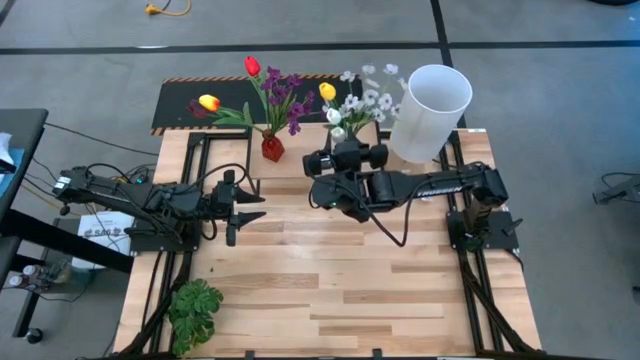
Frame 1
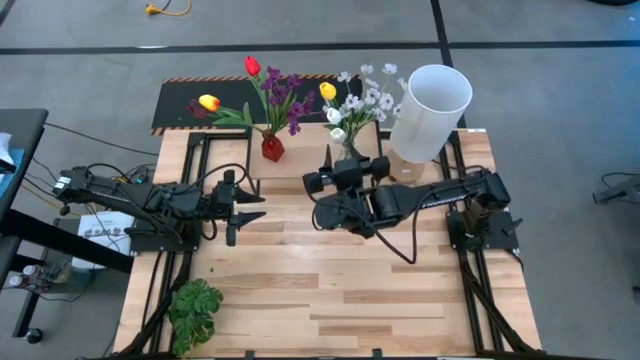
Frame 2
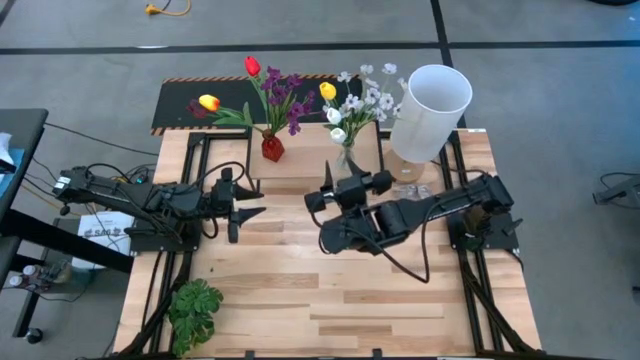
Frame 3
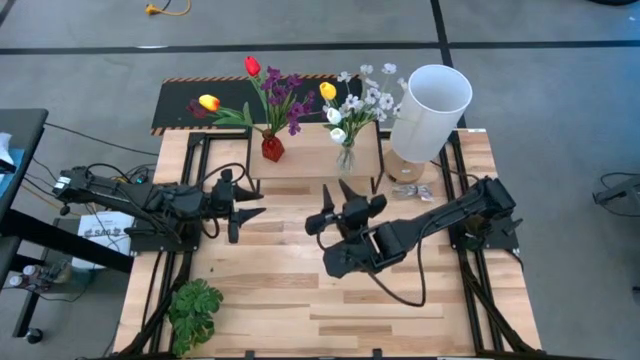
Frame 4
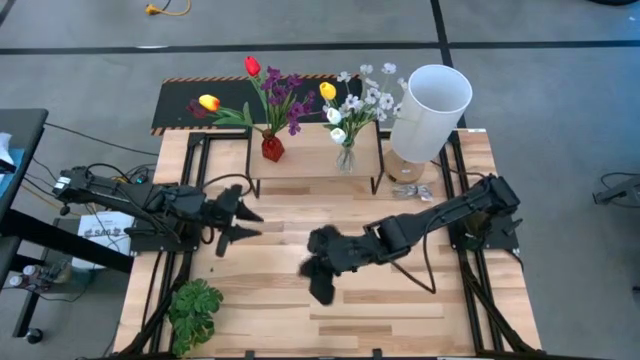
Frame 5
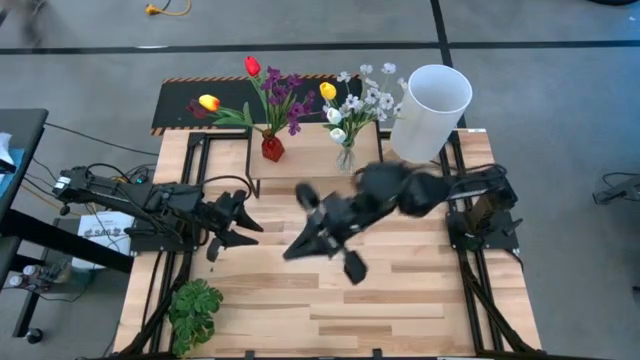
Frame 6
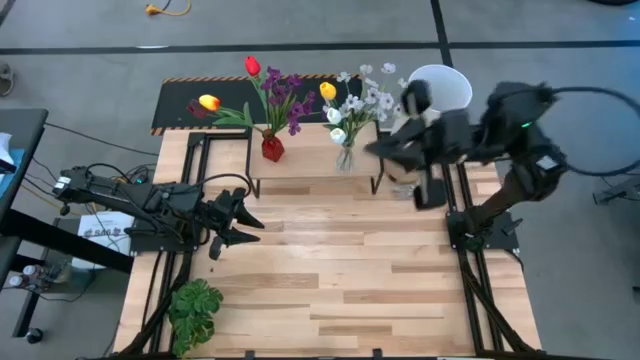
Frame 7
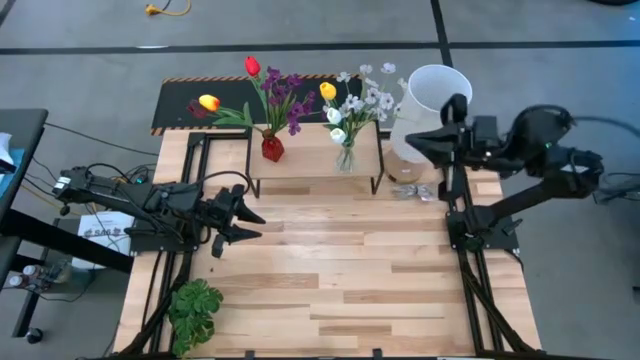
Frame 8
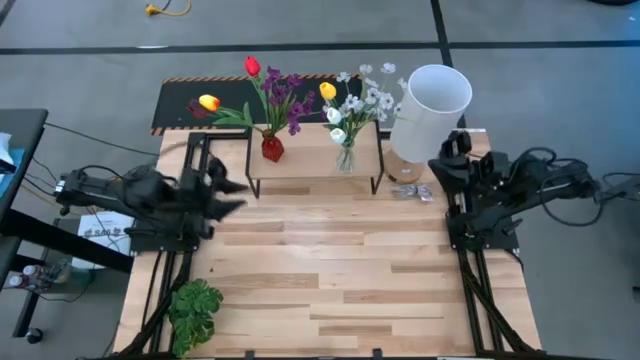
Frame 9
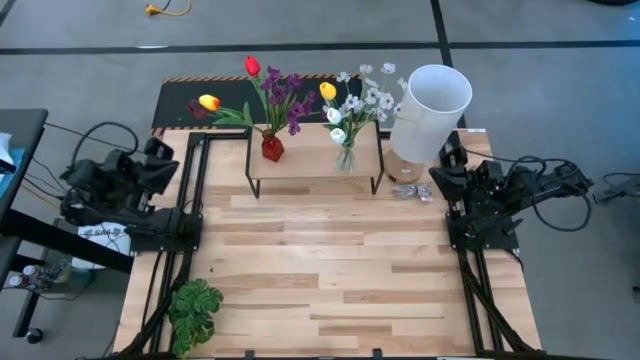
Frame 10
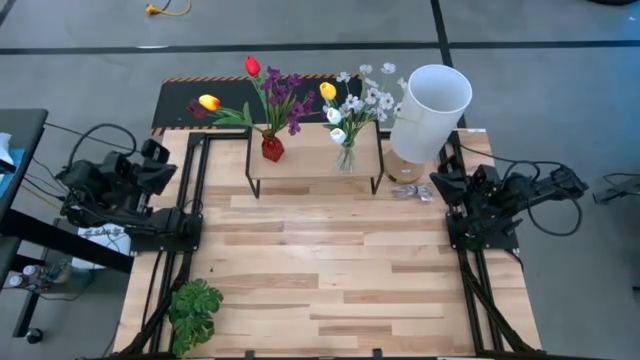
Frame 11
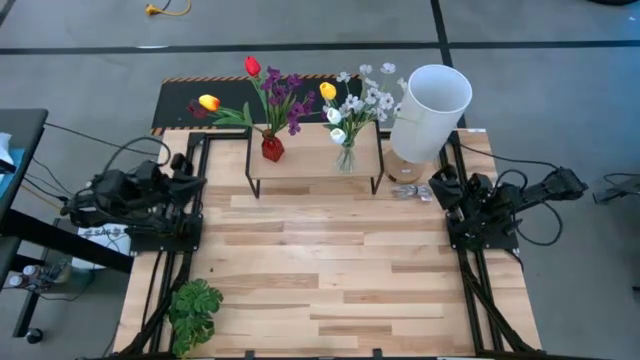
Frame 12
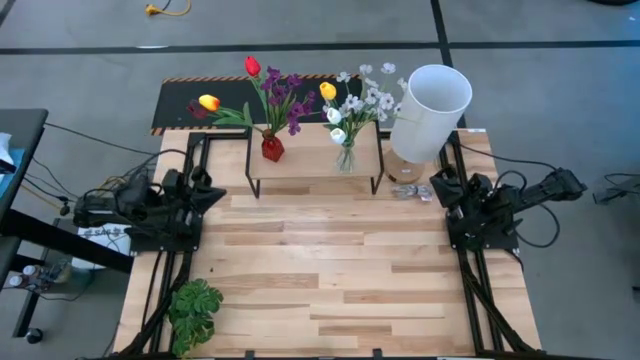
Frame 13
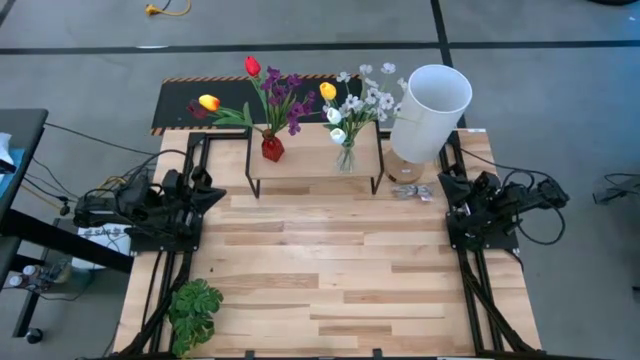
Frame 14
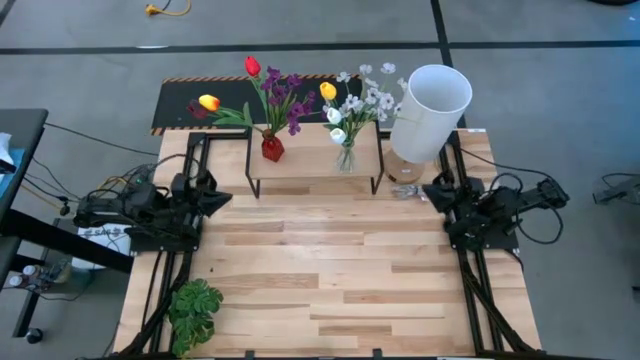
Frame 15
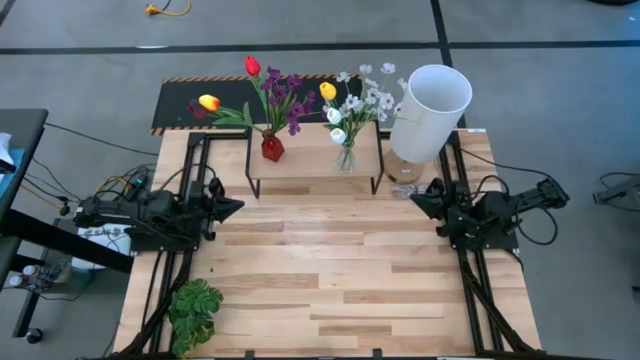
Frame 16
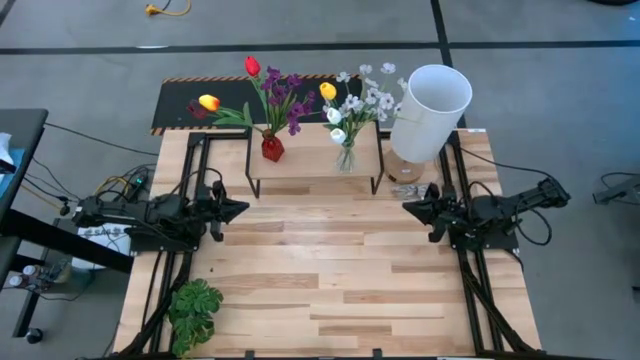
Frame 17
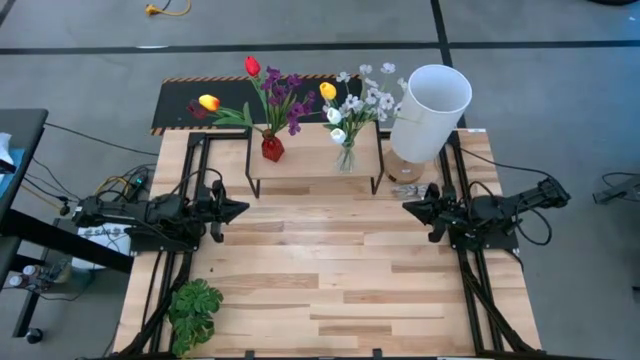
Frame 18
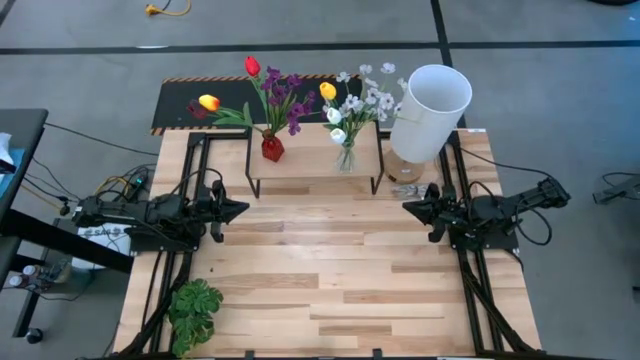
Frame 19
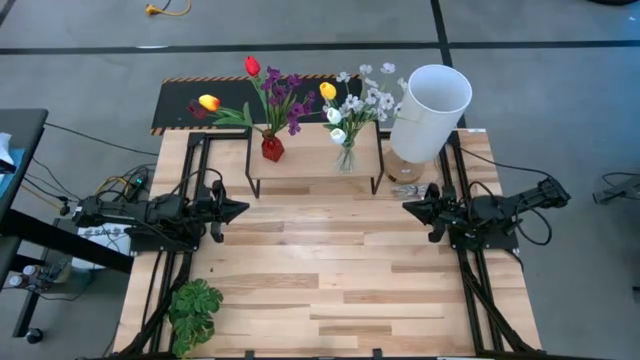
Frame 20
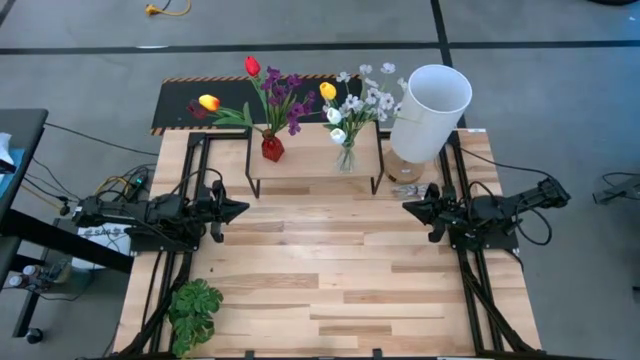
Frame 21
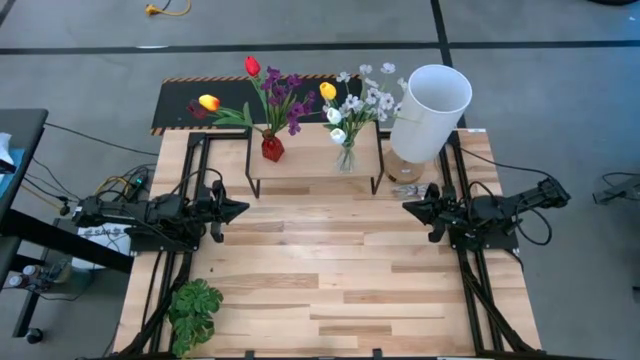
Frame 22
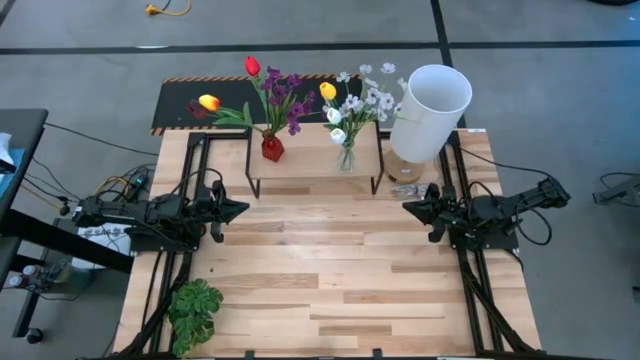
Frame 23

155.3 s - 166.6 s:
Task: Pick and place flowers into a vace then onto a shelf
Return to Home Position

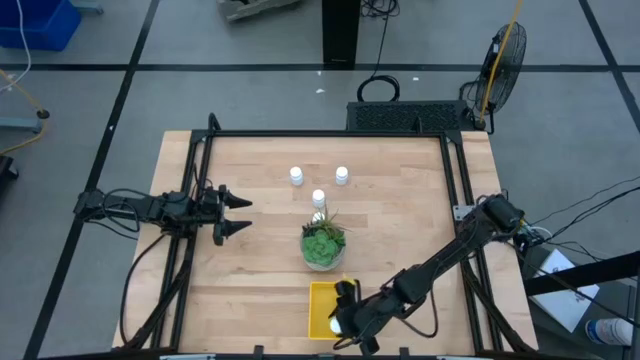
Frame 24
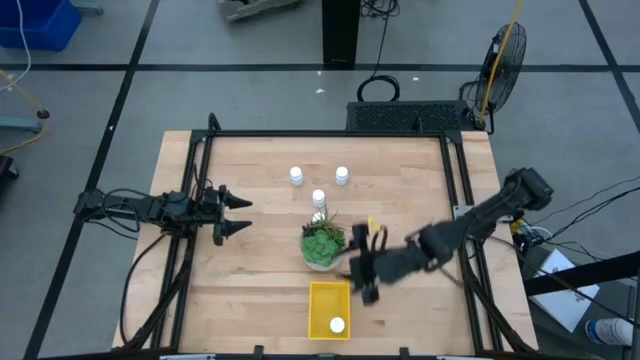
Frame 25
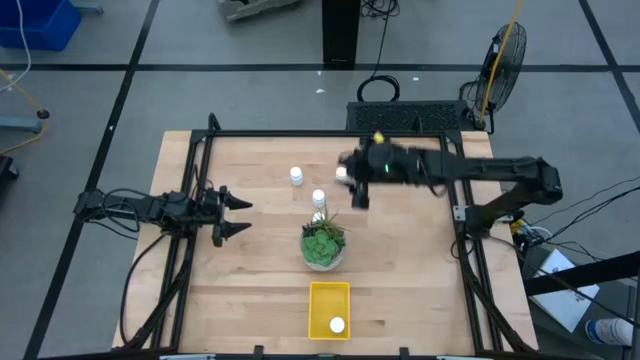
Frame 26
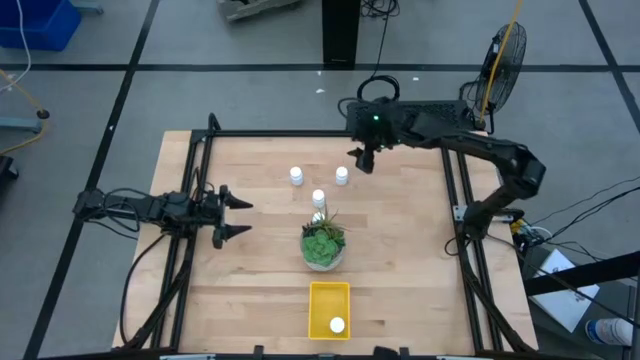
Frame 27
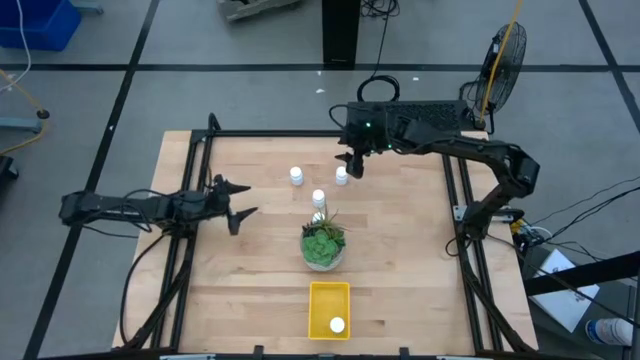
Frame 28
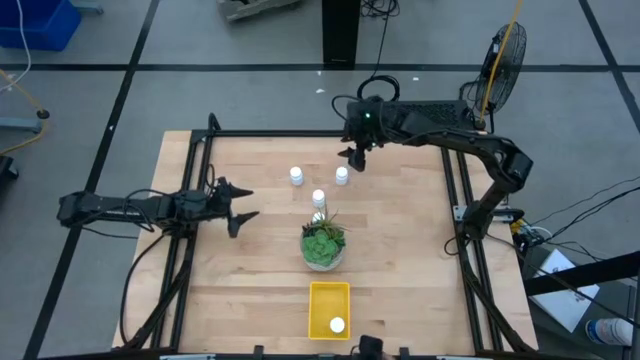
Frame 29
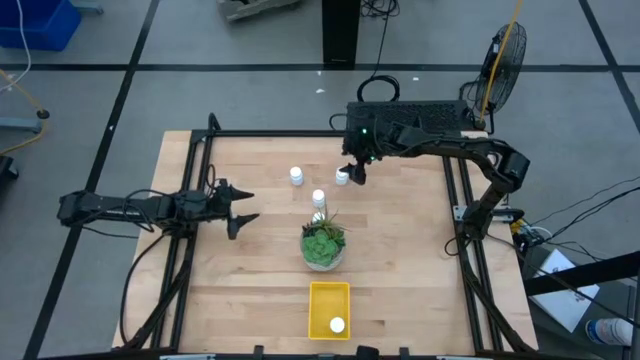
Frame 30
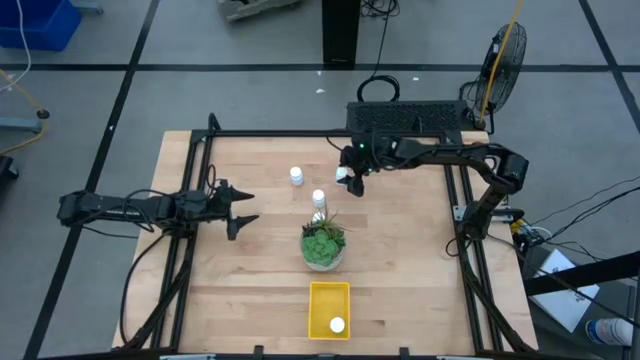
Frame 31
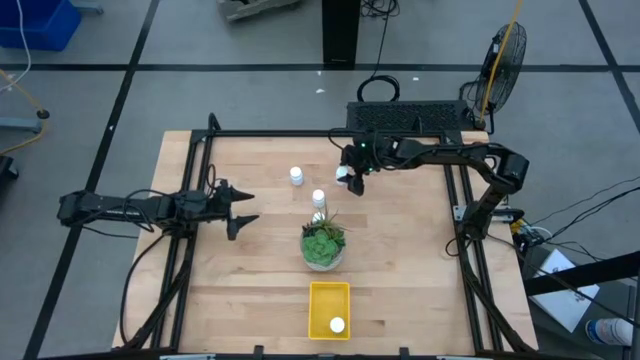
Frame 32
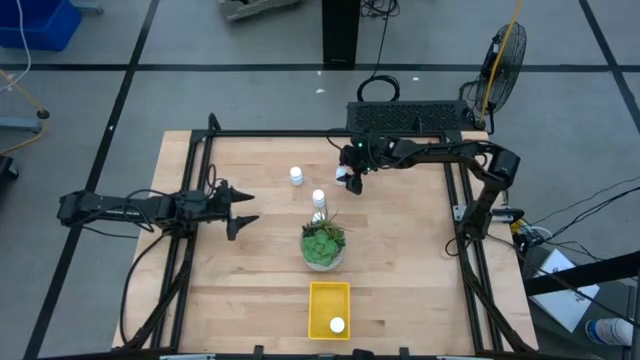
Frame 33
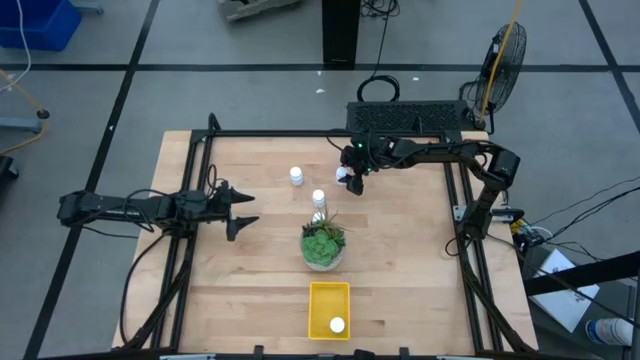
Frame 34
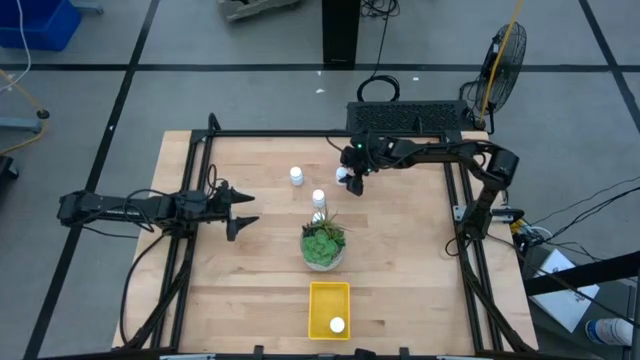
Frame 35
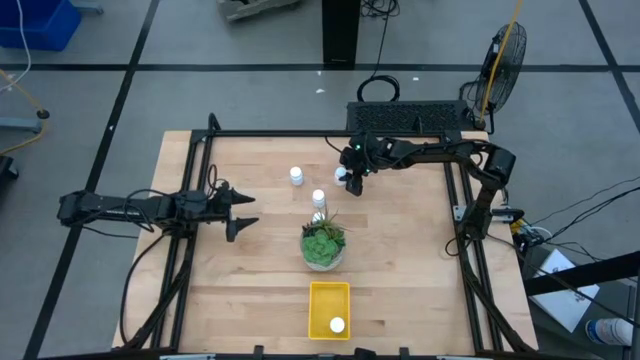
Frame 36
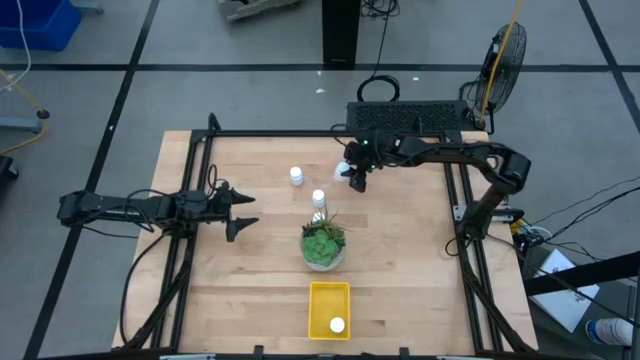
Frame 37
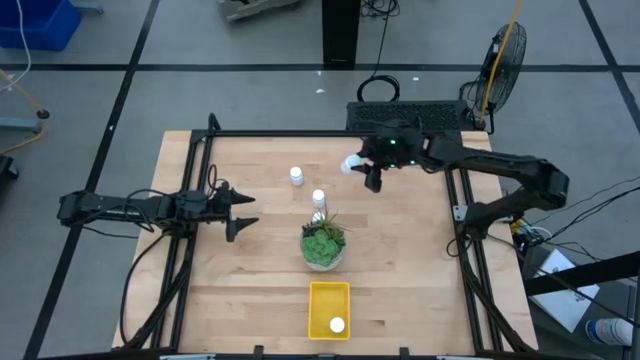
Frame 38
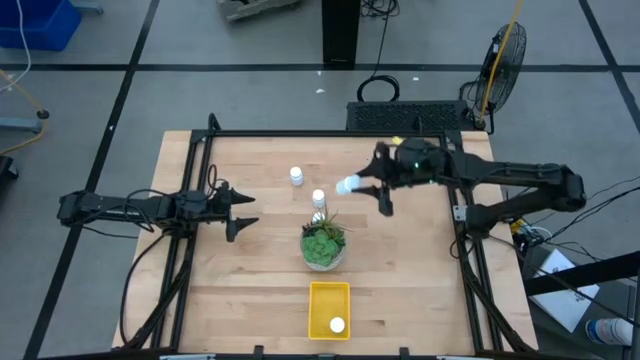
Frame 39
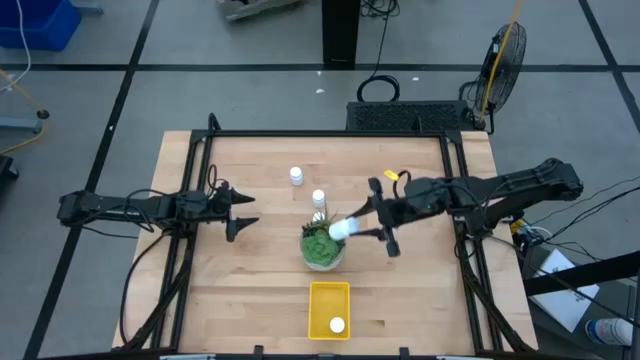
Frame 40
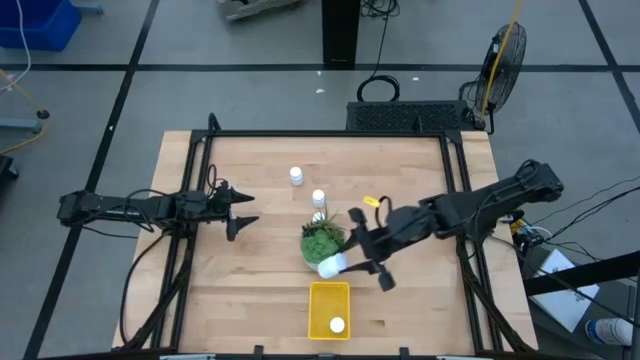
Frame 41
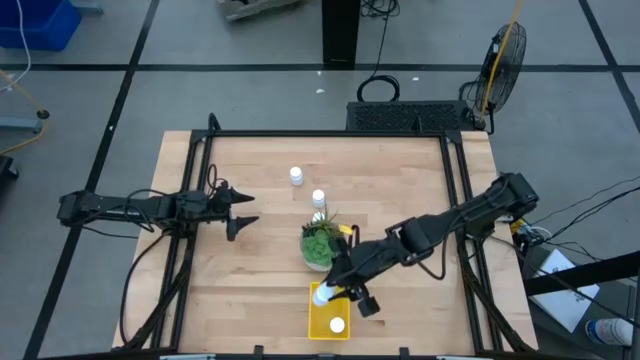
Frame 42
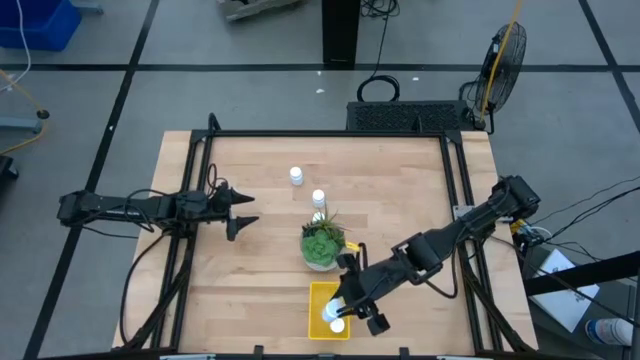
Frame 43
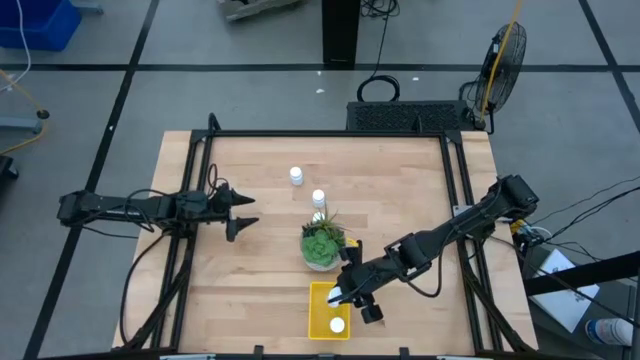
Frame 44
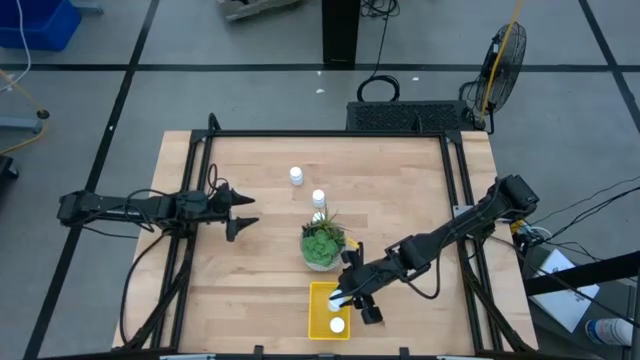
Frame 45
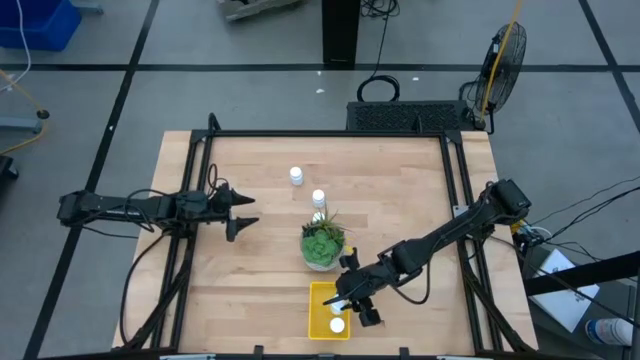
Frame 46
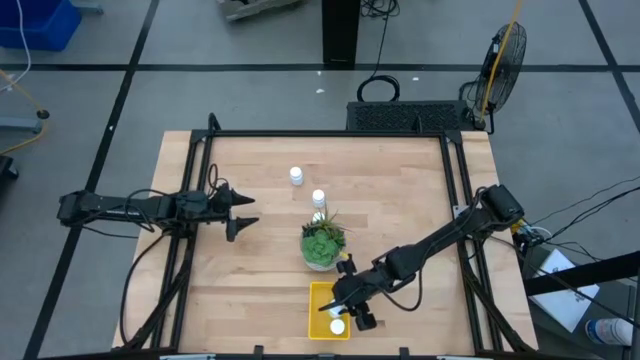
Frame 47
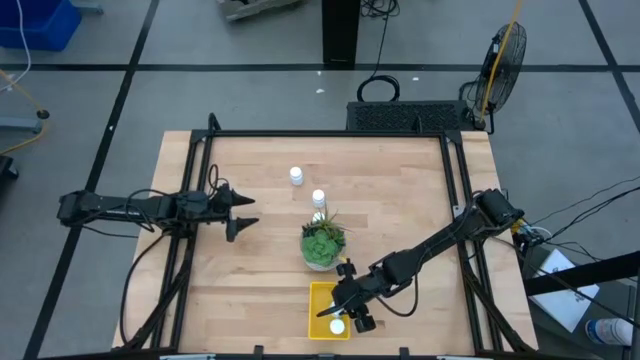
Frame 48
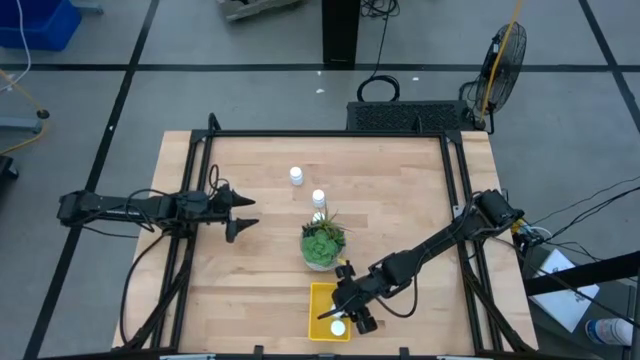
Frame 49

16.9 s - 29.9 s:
Task: Pick and place pill bottles into a basket
Put the white pill bottle into the yellow bin
